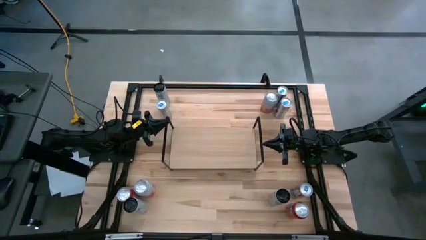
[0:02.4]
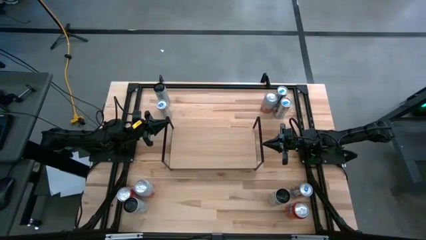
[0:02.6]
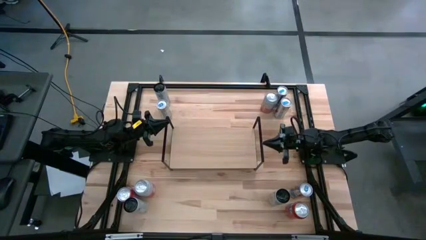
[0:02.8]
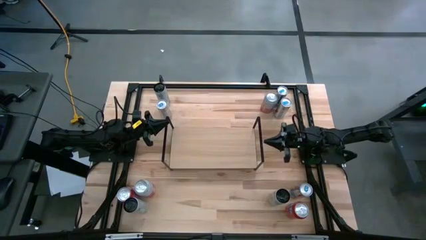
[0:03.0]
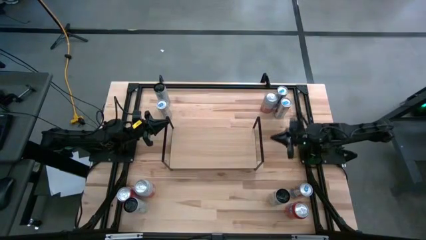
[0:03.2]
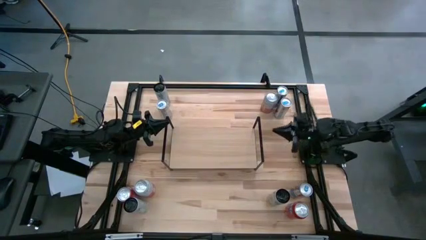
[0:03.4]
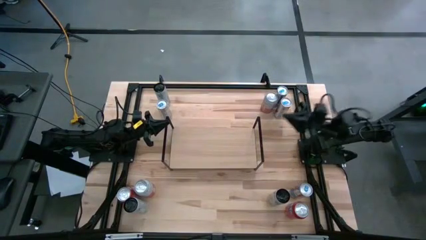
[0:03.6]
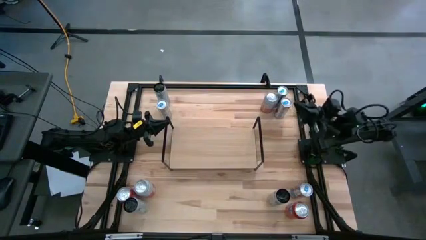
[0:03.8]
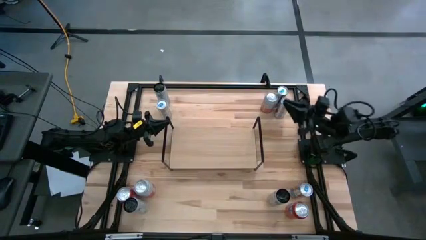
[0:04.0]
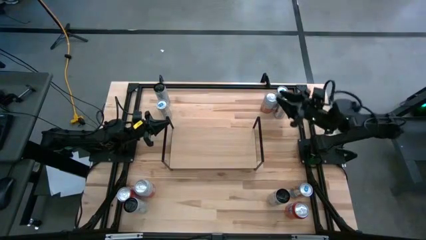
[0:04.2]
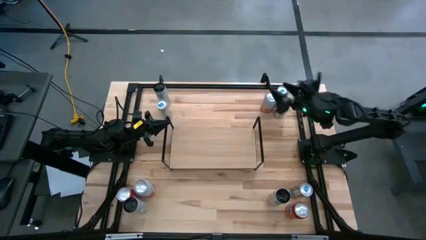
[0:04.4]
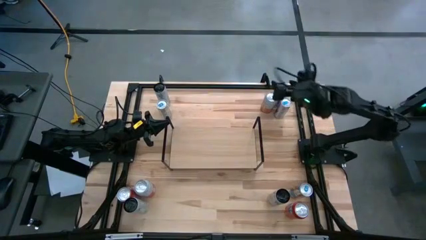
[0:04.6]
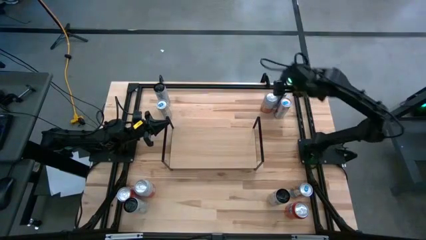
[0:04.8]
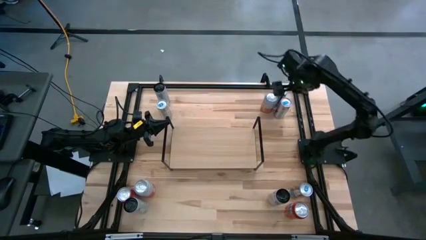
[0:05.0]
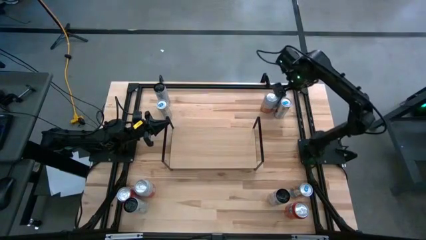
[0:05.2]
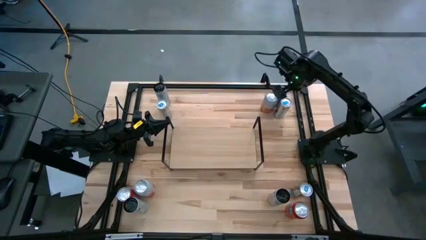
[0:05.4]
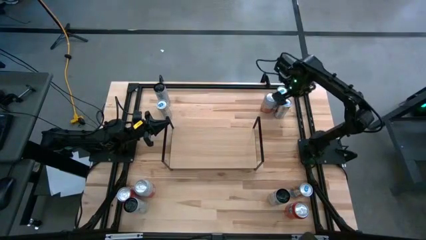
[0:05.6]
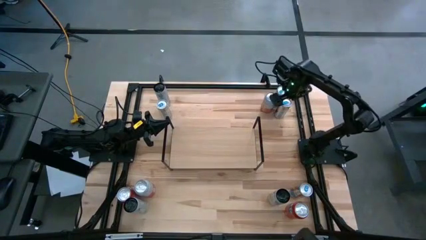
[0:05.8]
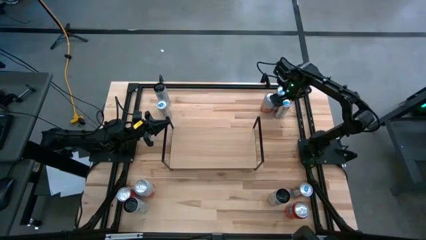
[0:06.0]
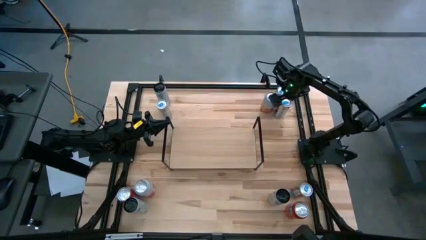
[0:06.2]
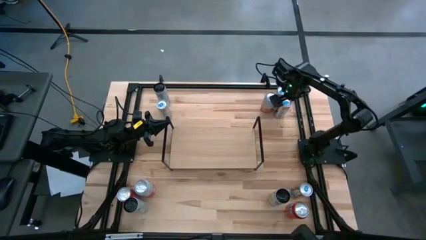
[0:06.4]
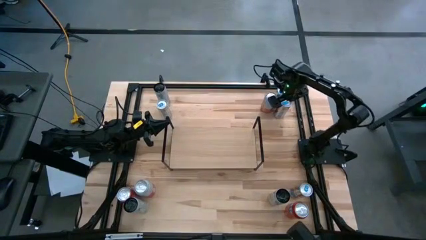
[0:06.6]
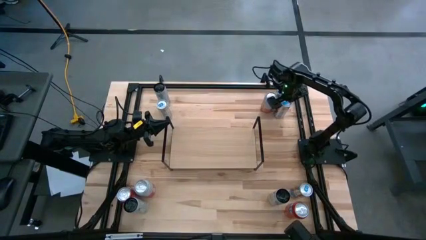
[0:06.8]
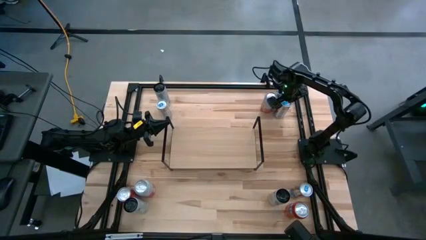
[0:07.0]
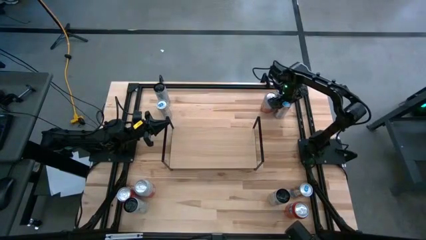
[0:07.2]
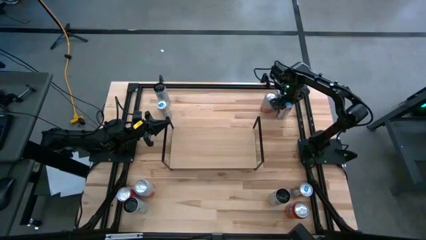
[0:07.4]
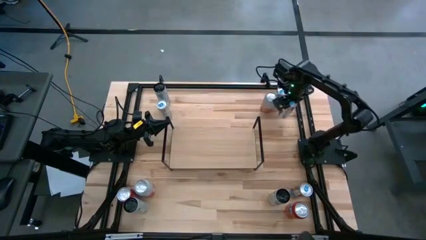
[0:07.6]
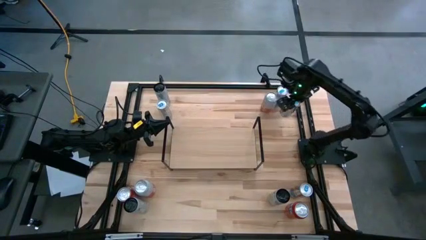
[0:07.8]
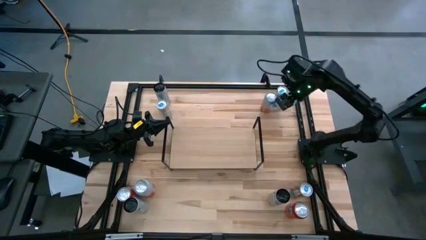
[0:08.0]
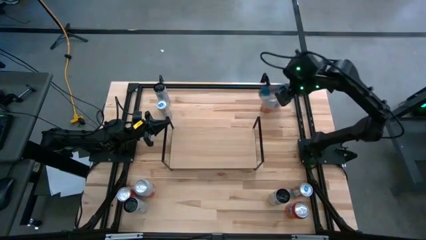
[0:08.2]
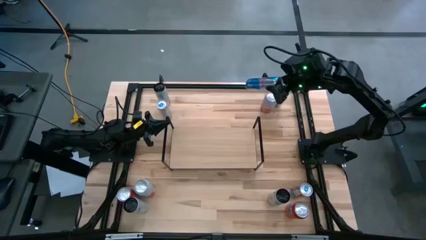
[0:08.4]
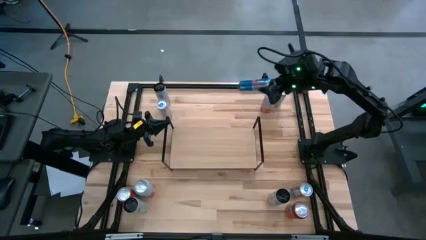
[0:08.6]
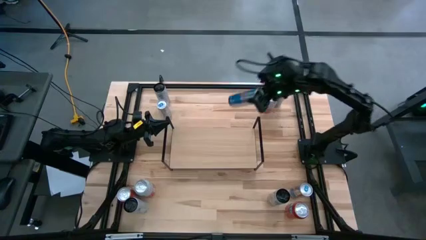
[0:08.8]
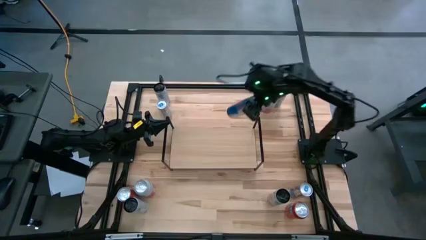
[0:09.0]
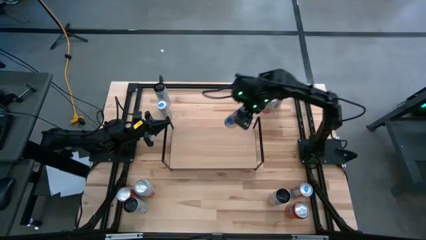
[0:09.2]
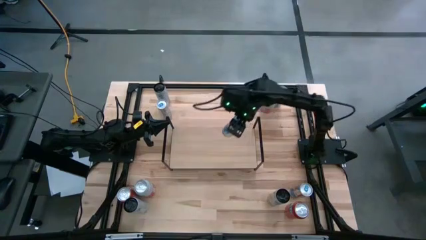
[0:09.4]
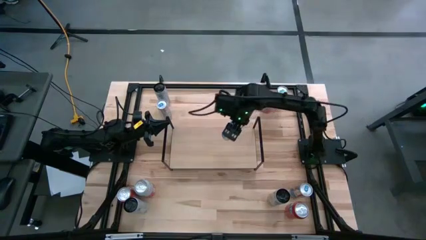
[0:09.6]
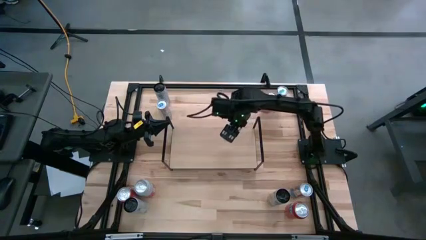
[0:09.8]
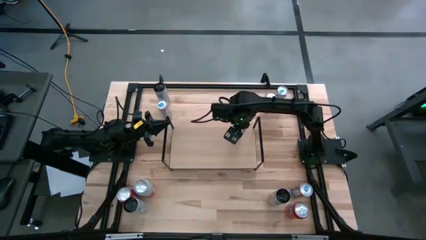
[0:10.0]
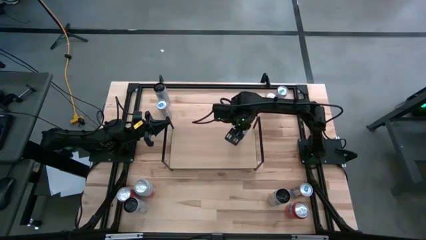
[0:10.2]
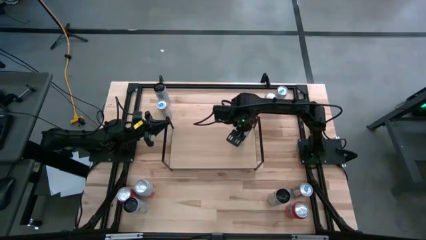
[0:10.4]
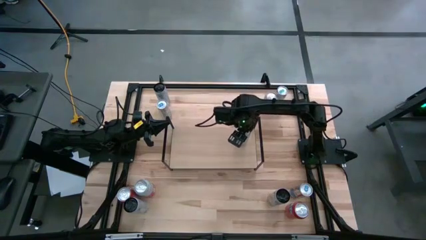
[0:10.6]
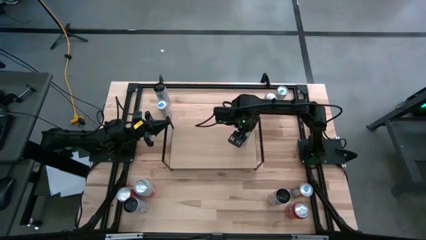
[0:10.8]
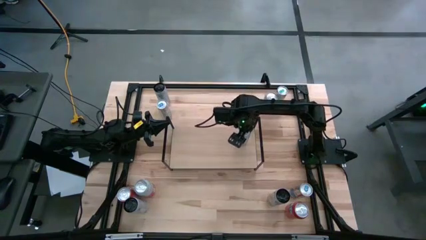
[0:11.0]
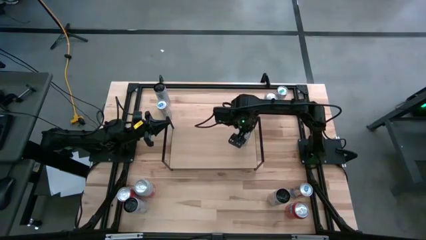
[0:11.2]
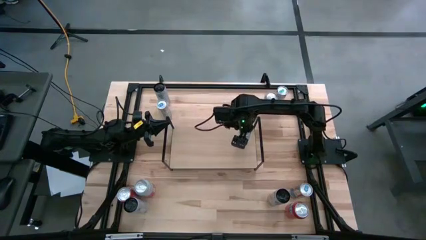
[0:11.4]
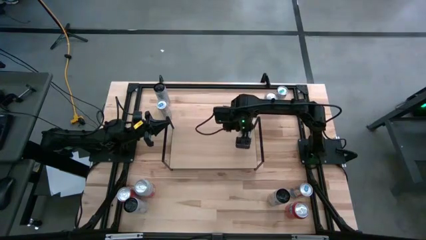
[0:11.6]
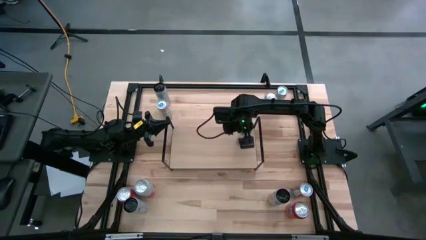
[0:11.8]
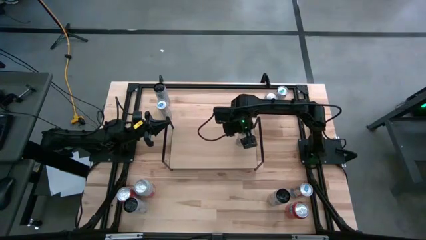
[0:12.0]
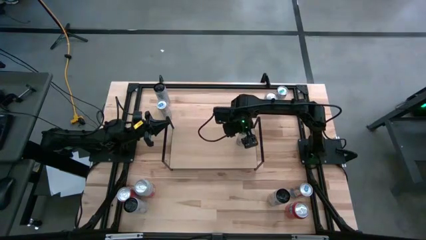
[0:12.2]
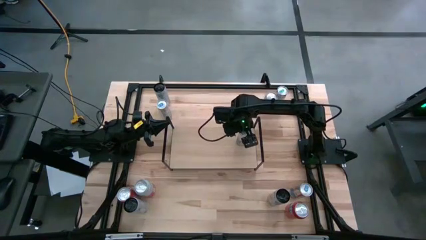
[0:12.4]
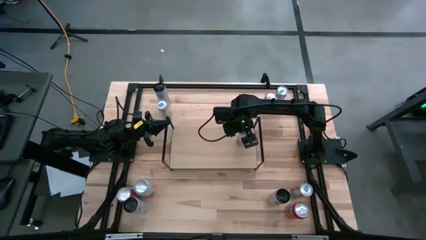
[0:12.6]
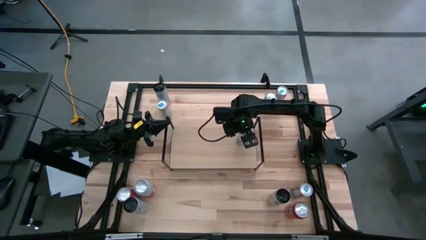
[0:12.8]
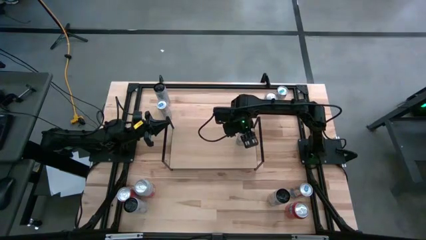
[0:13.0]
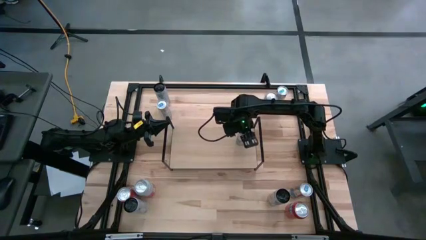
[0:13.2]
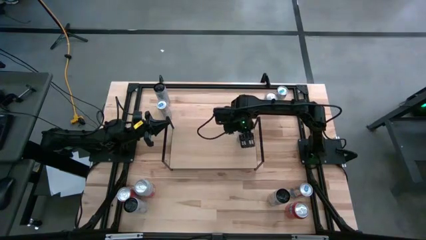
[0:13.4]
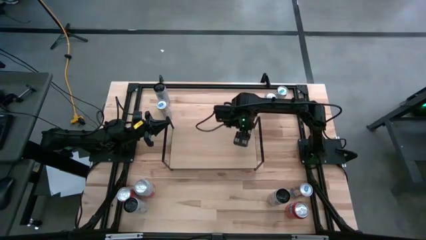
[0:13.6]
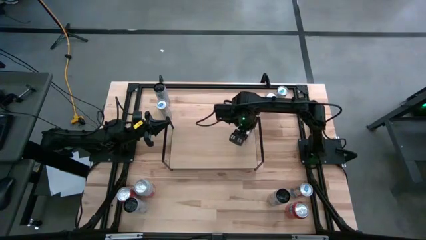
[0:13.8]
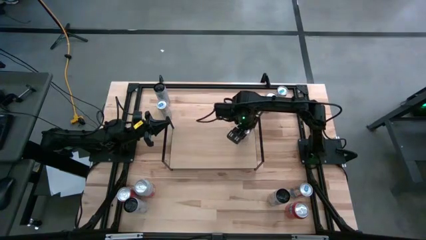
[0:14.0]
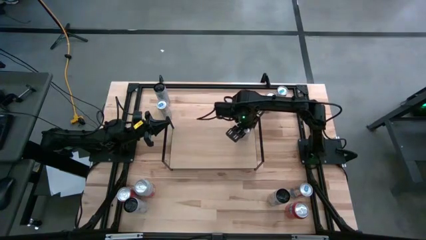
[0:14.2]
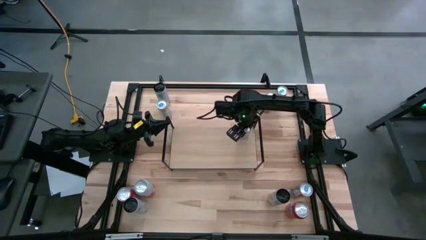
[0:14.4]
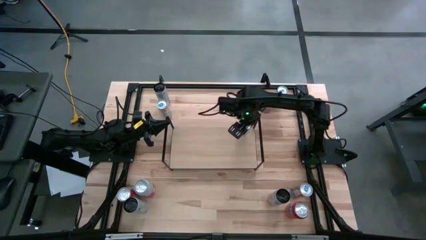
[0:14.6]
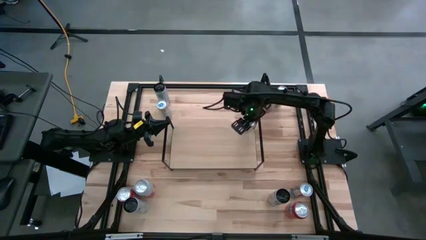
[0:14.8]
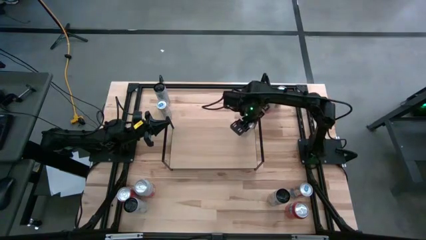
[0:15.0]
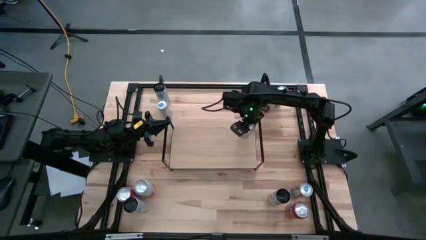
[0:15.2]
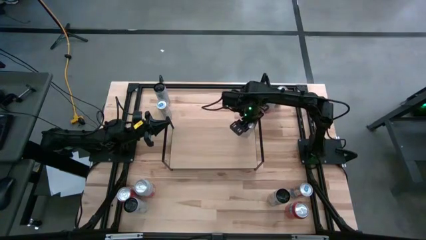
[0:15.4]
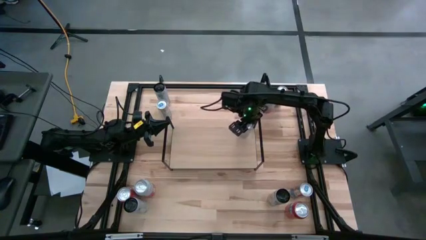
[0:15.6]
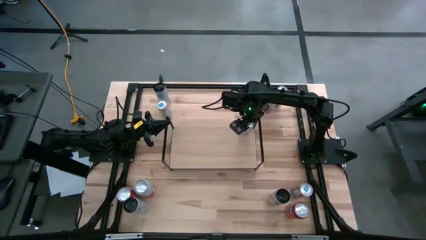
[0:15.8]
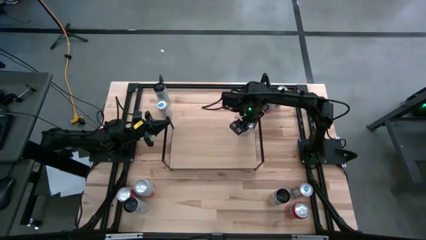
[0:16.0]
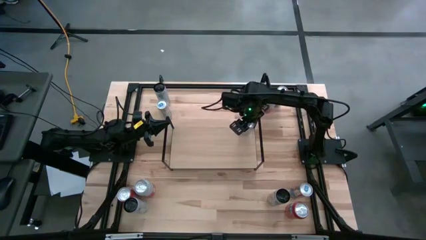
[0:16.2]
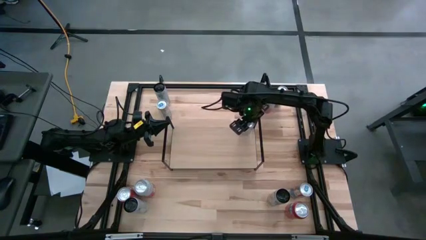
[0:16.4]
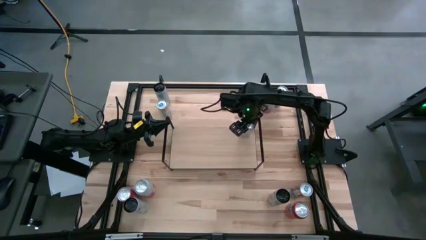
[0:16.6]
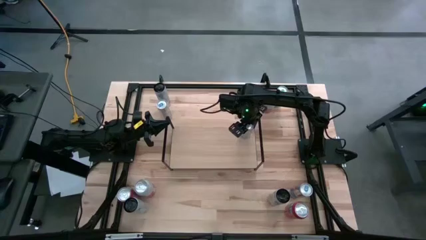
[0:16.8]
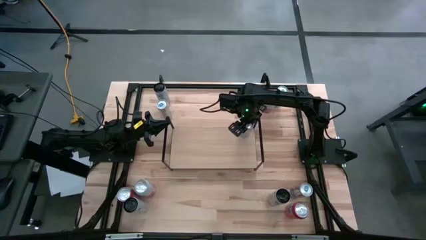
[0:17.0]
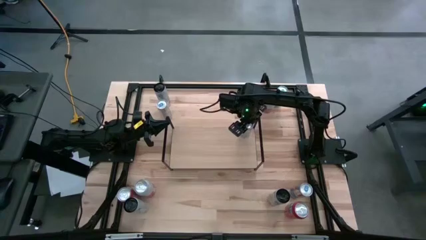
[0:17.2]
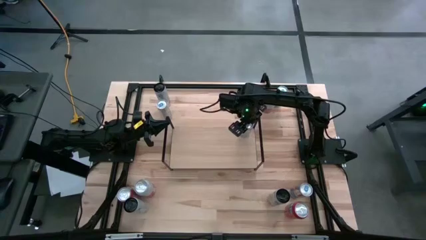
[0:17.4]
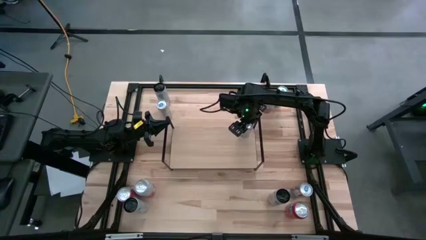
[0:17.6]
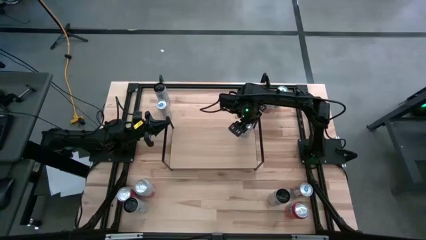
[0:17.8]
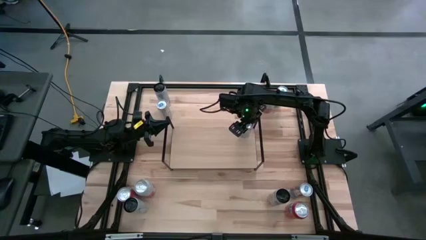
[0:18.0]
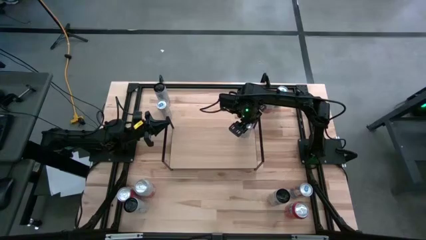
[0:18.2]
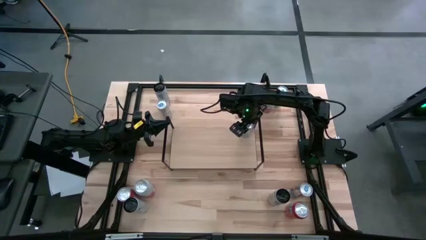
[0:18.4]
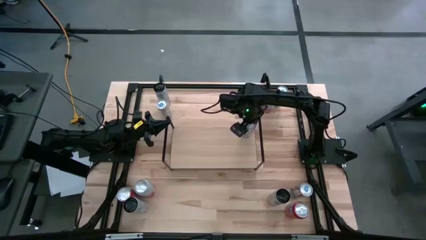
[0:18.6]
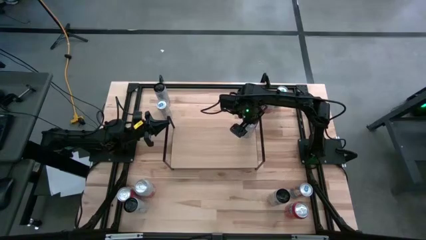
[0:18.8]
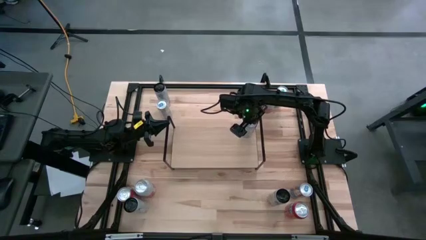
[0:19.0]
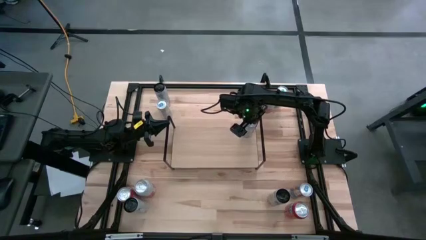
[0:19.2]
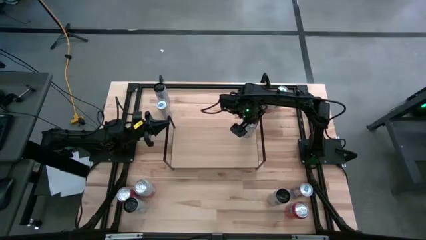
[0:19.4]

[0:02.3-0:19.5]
Task: Place canned beverage on shelf
Put the blue soda can on the shelf
